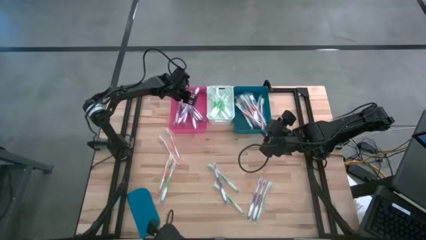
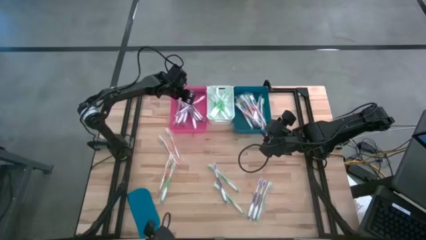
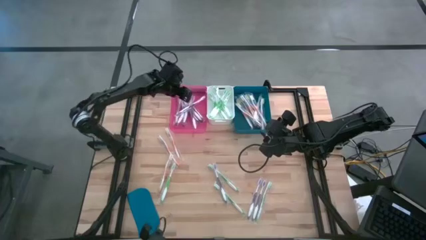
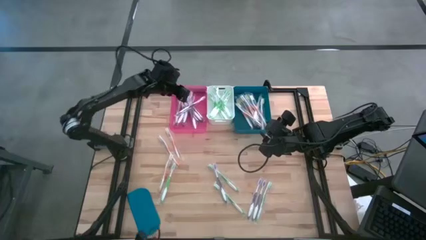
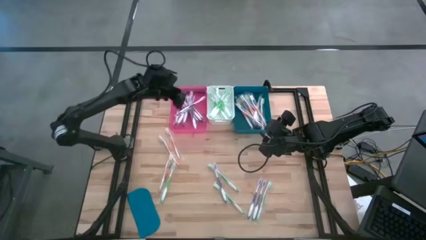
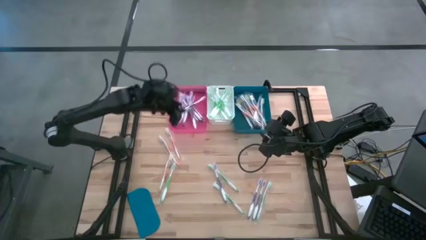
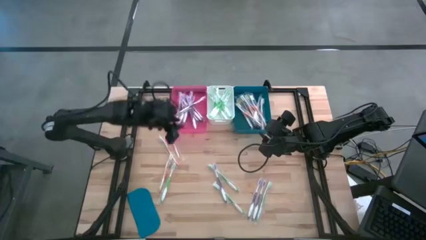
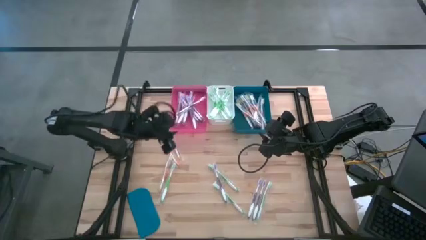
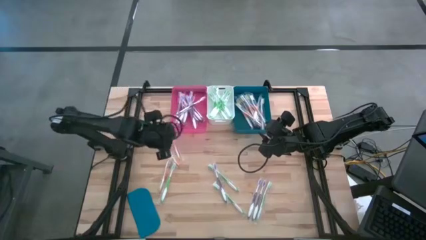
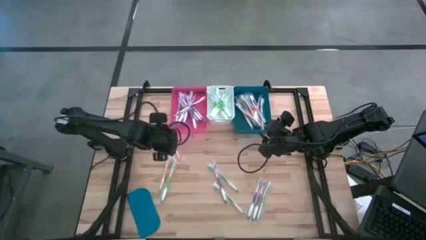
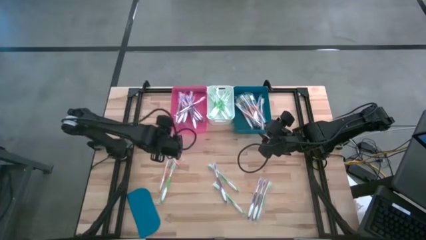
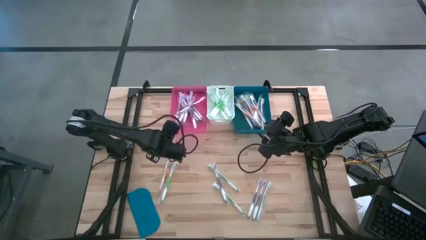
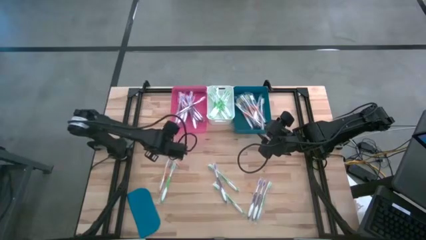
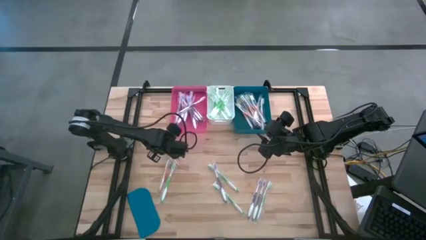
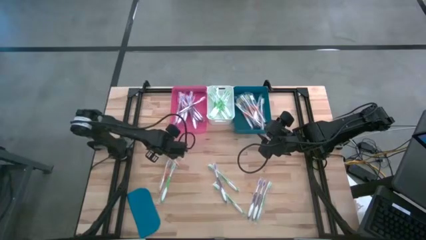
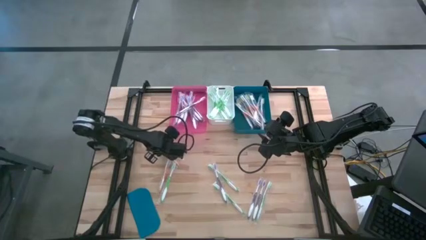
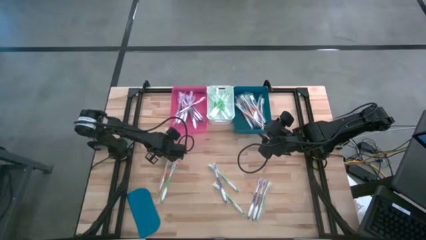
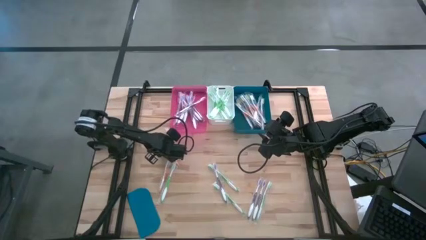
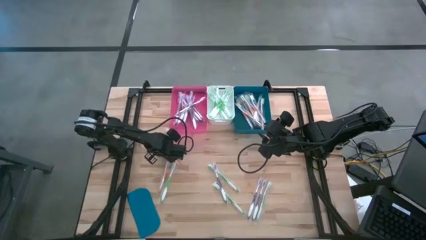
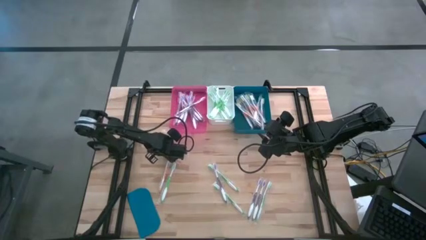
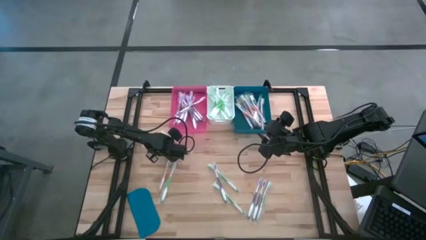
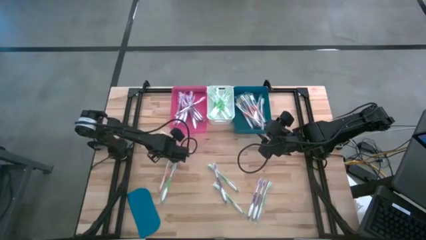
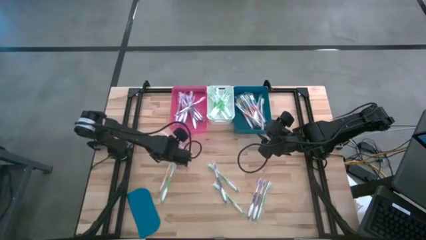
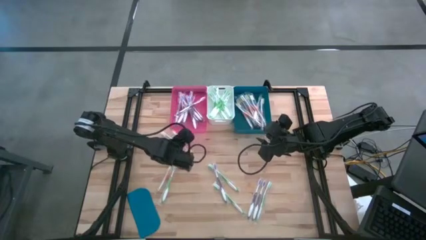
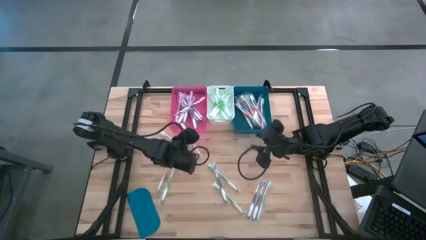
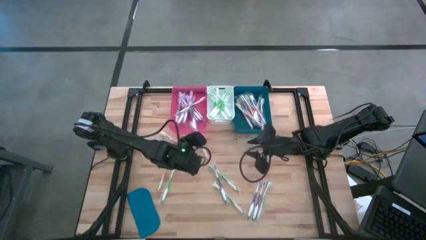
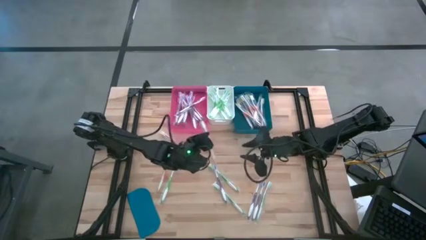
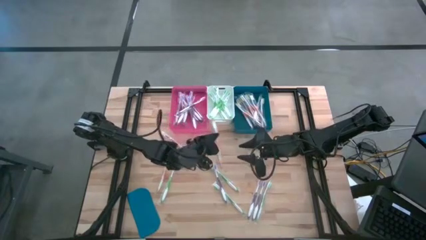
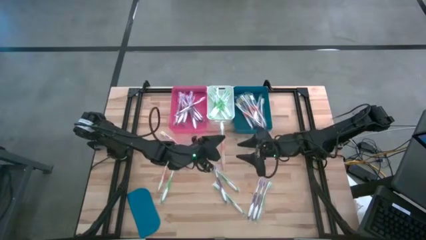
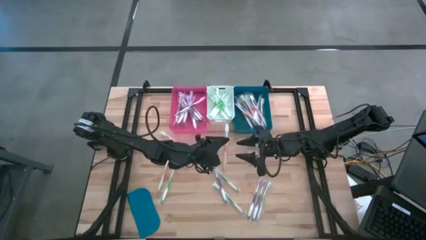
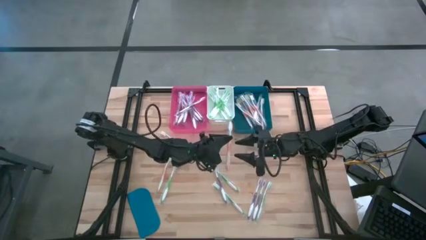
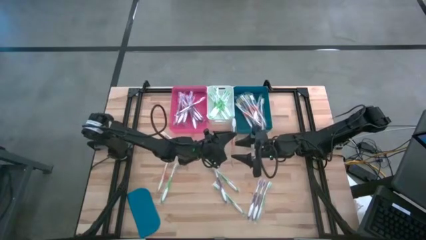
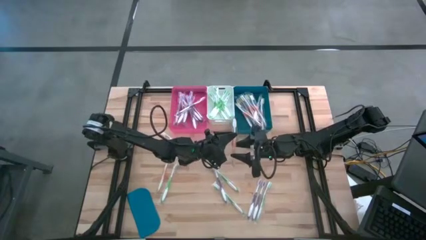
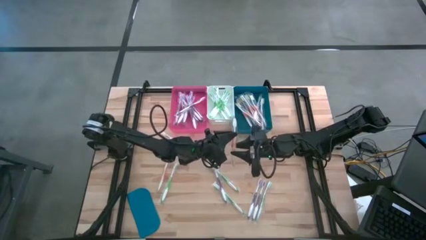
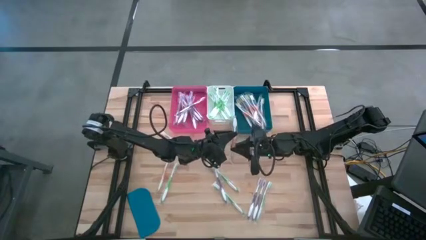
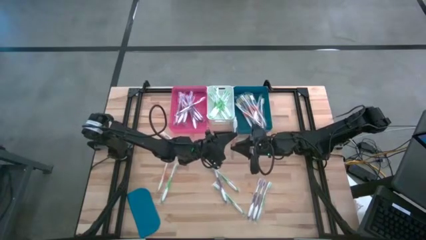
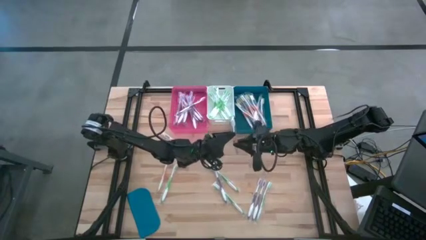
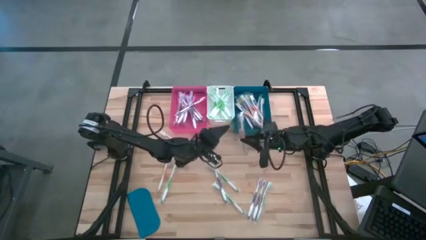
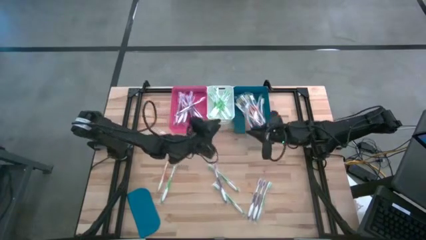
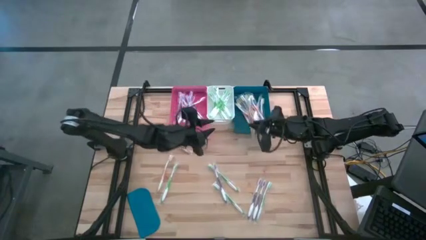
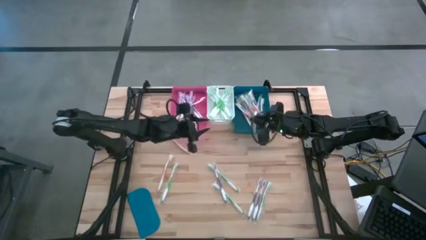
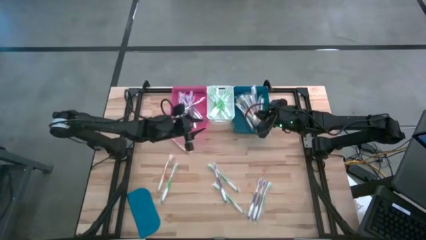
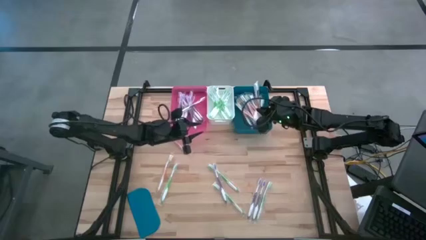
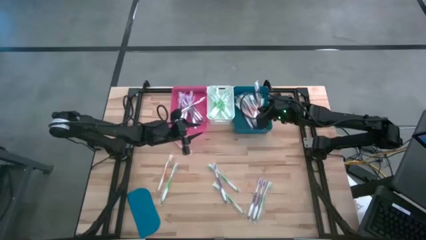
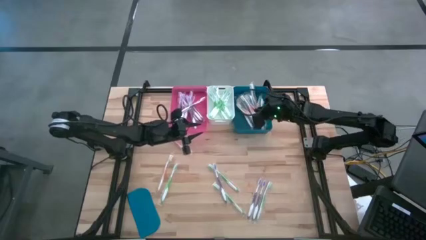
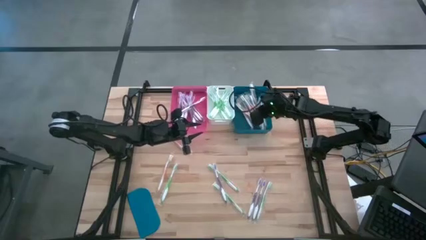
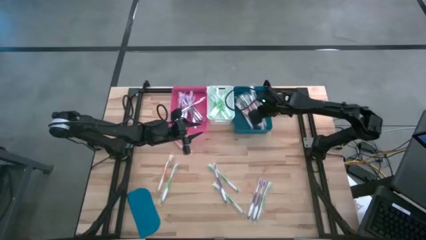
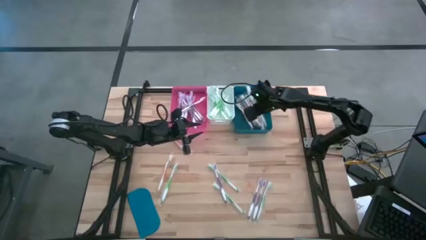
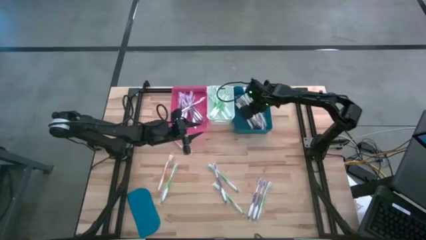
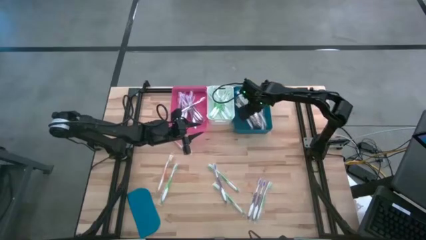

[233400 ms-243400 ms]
Task: Pick & Place Toothbrushes
Put the orange toothbrush into the blue bin

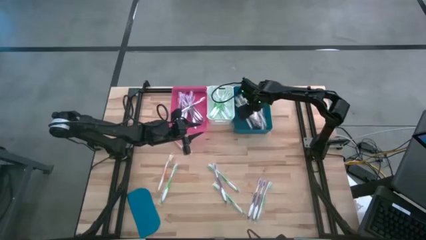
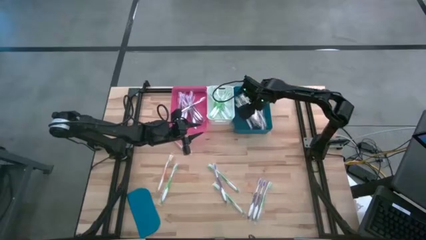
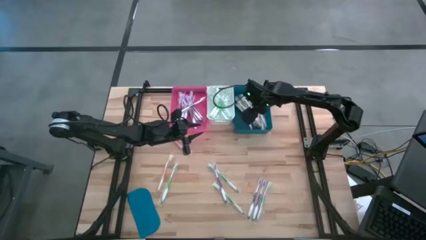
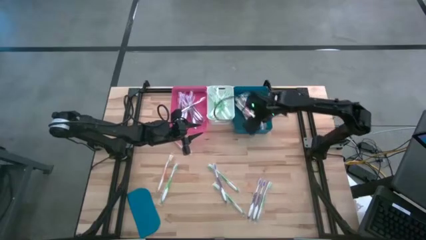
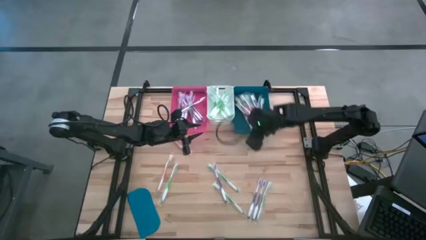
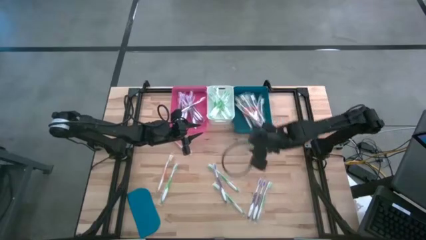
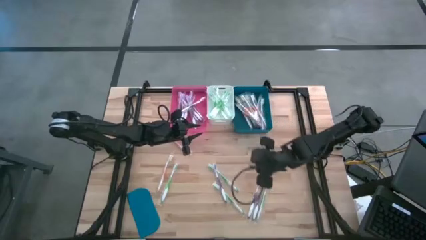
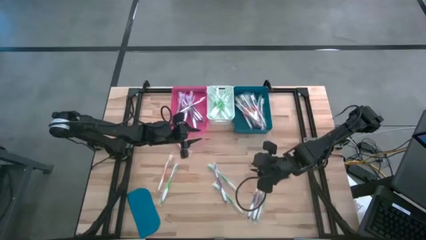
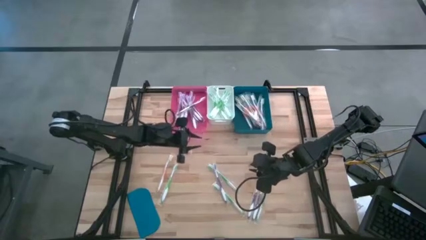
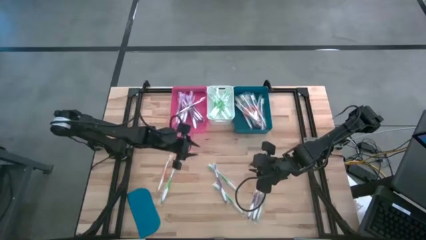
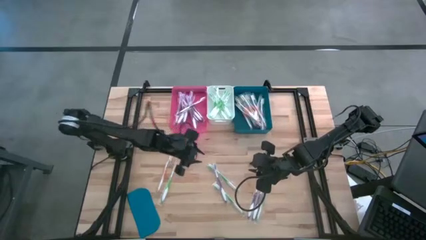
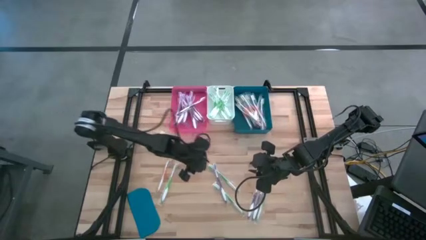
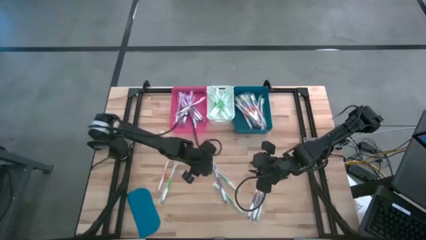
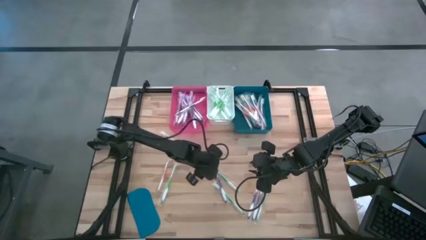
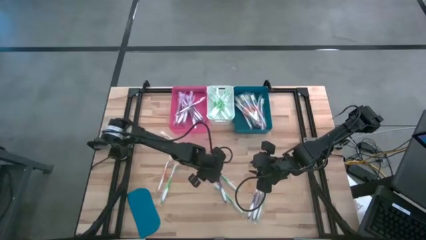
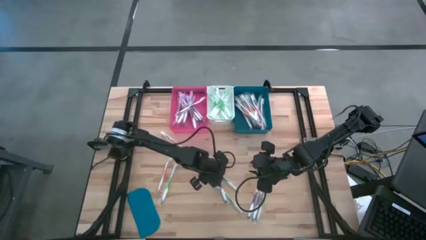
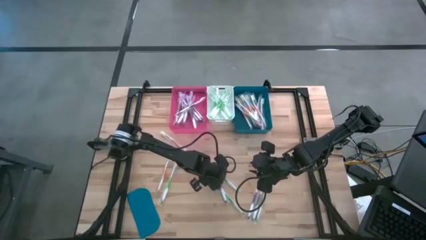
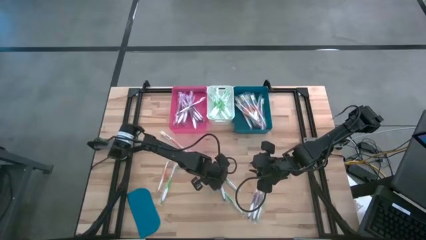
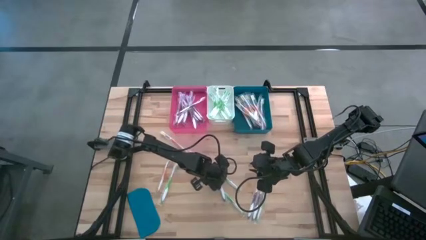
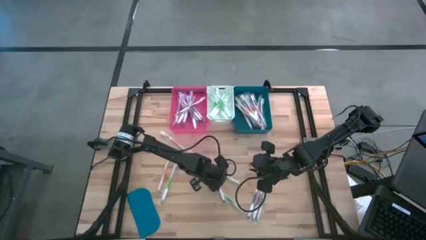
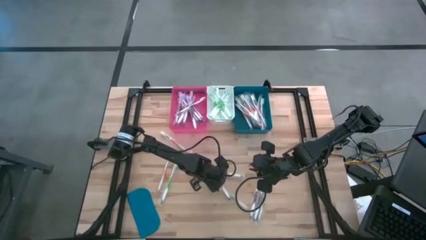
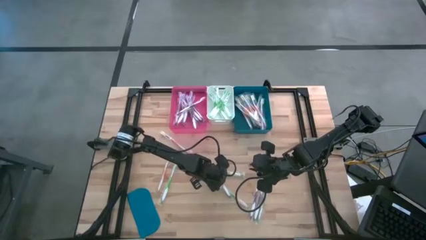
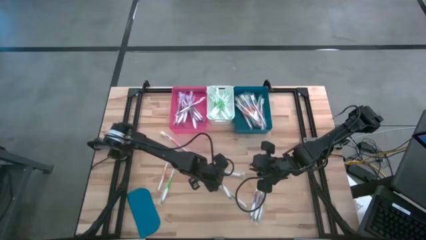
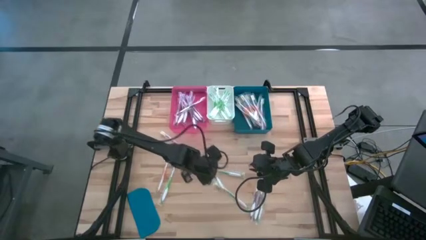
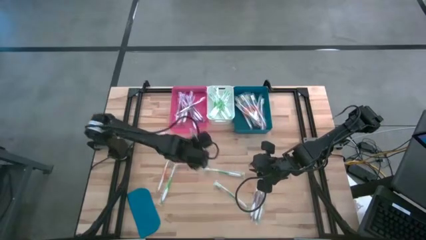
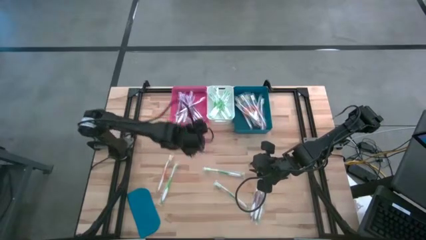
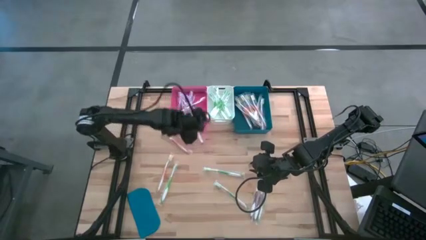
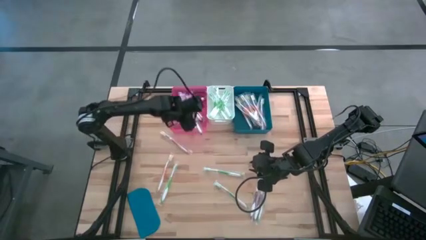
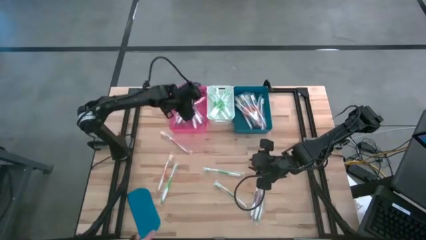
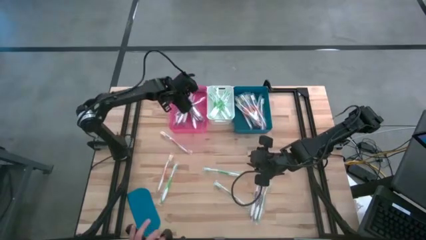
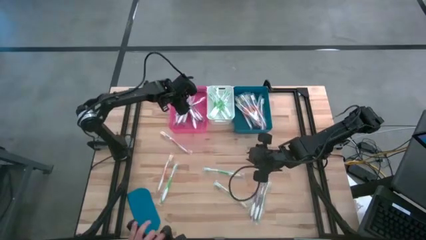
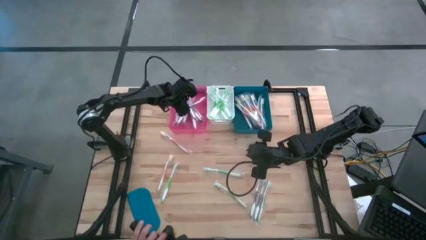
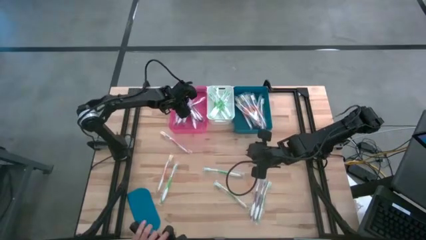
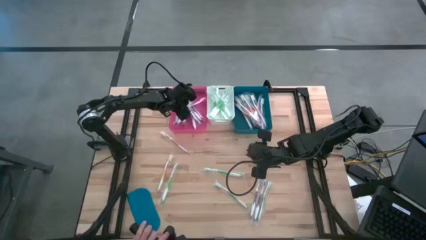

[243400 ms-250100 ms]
Put the violet toothbrush into the pink bin
